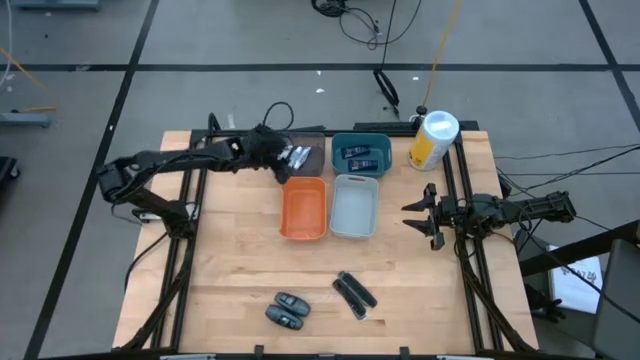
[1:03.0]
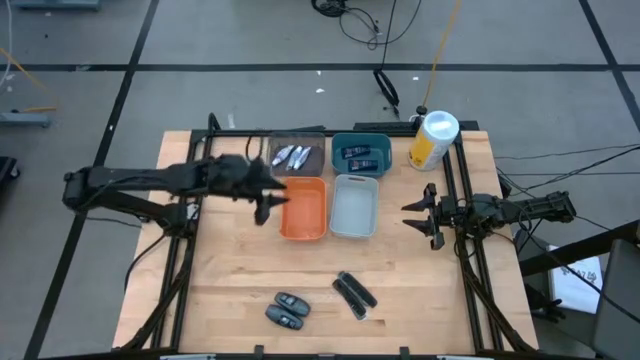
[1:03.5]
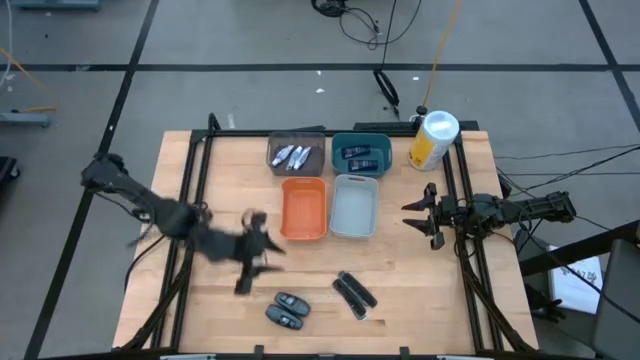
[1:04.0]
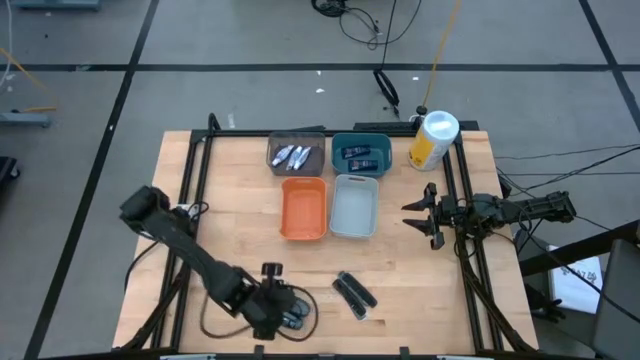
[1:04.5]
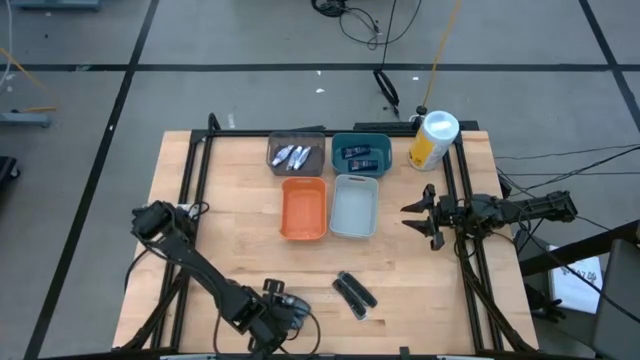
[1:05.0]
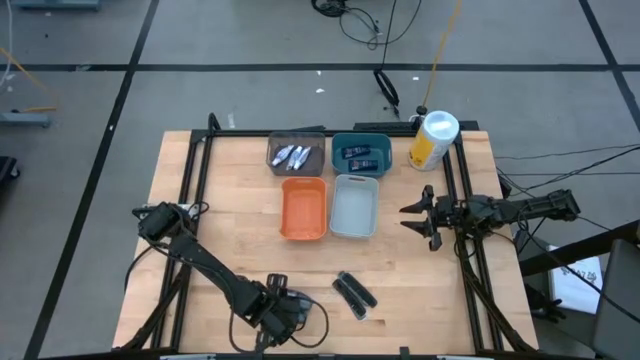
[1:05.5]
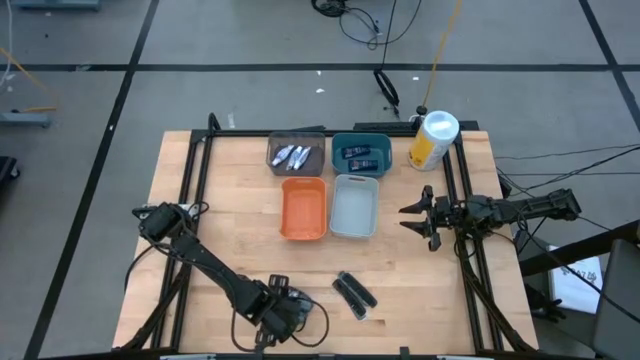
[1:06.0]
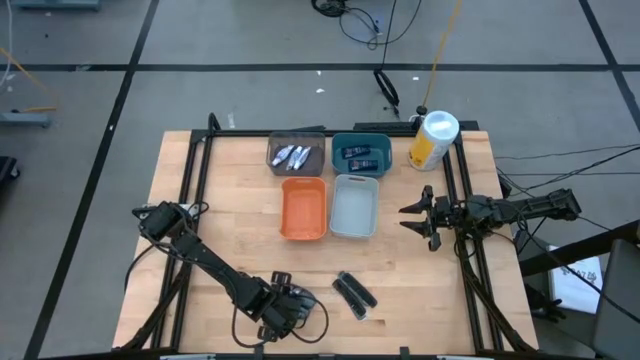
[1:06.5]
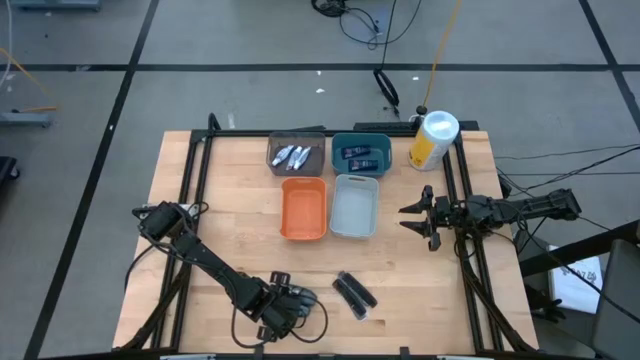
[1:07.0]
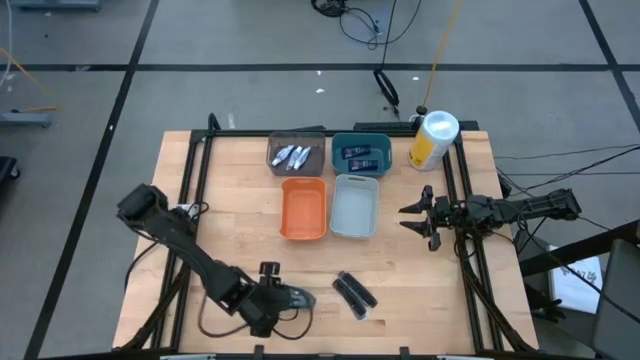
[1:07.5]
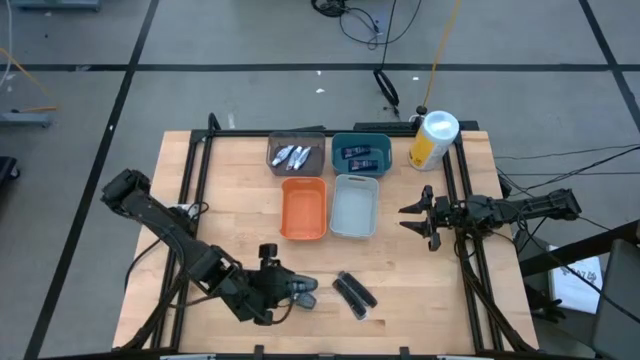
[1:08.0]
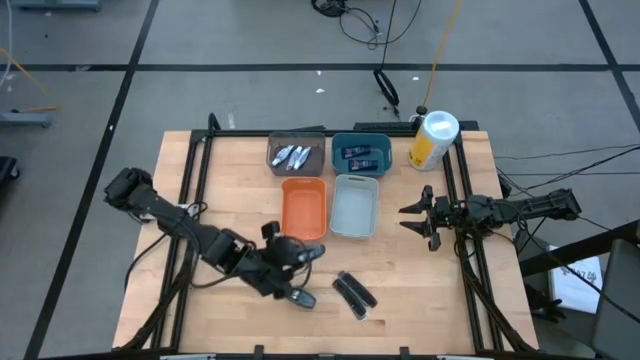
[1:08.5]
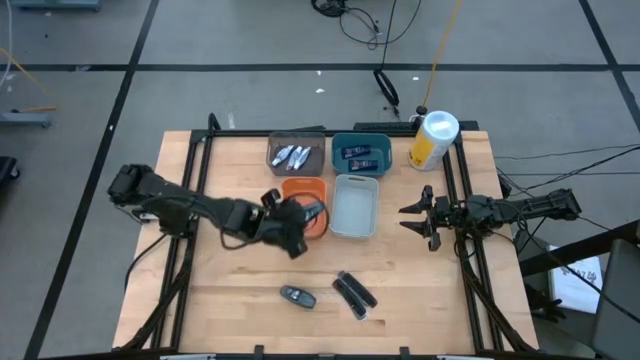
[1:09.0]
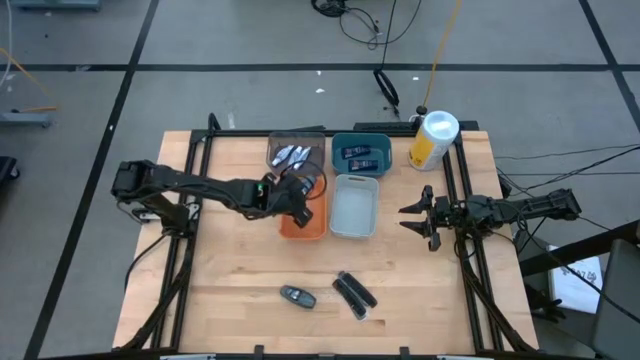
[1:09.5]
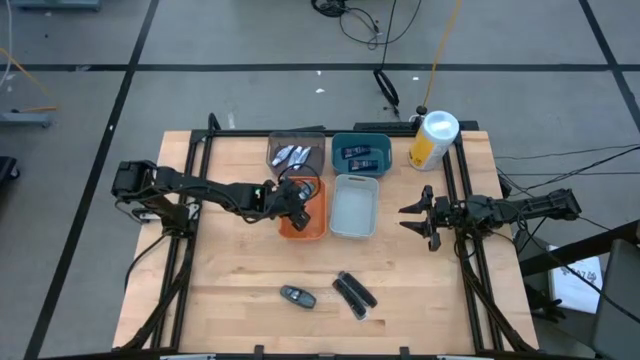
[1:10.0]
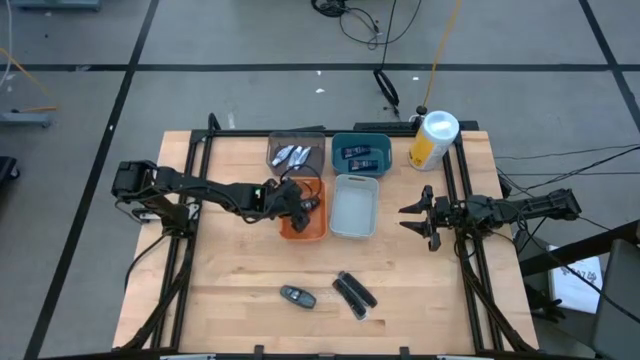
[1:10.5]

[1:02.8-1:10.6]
Task: Pick & Place Travel size toiletries
Put the bottom gray deodorant into the orange bin

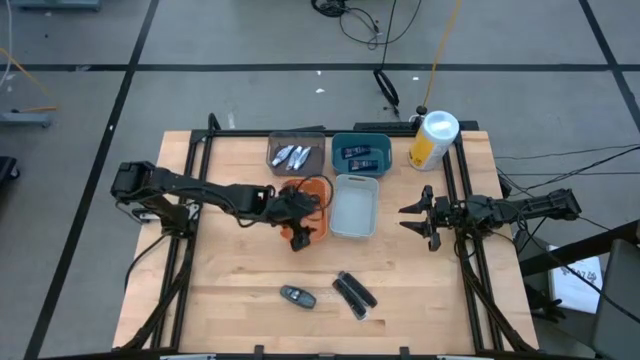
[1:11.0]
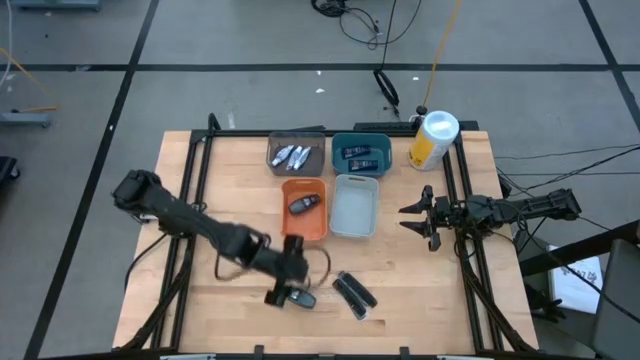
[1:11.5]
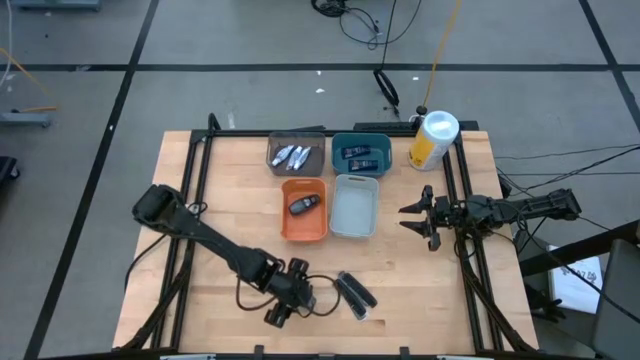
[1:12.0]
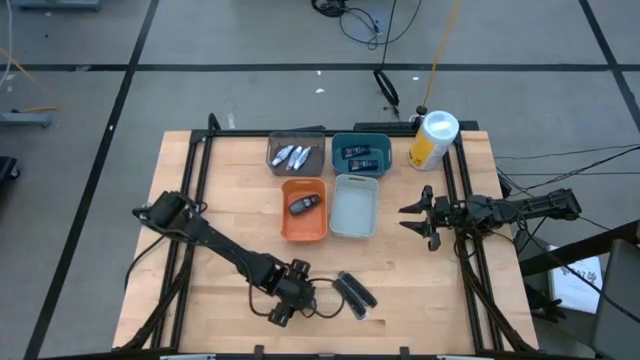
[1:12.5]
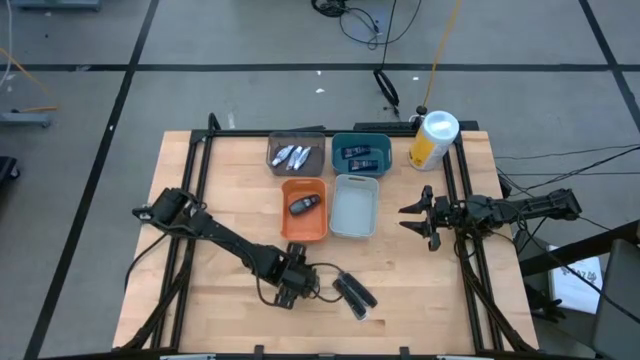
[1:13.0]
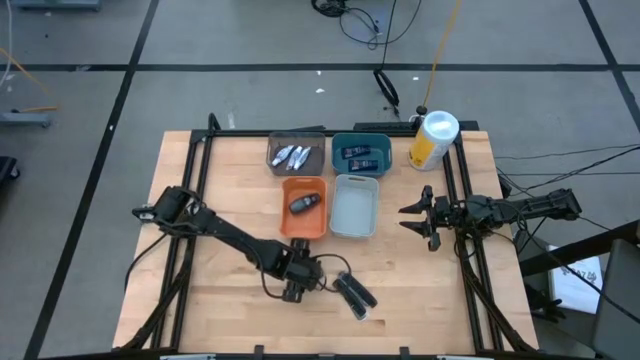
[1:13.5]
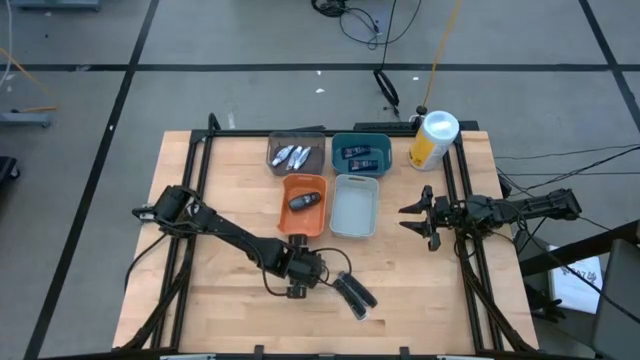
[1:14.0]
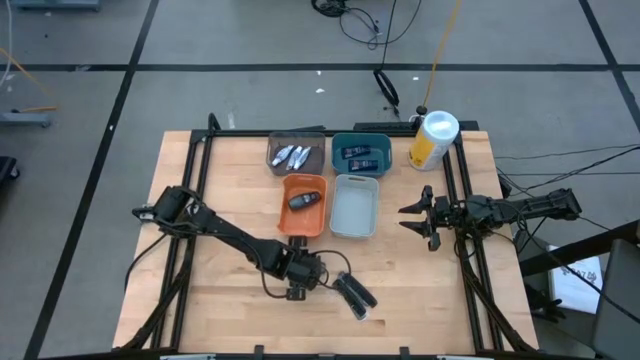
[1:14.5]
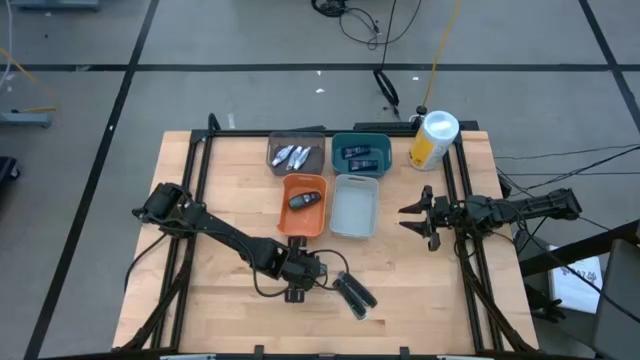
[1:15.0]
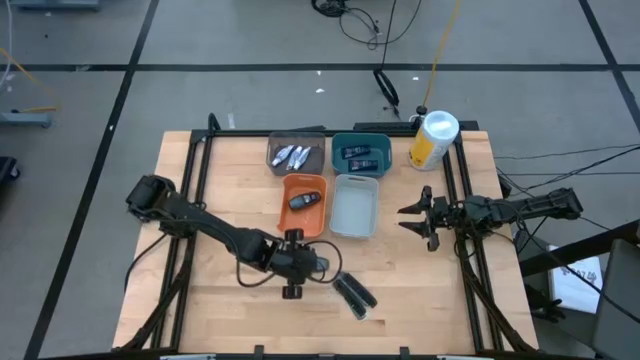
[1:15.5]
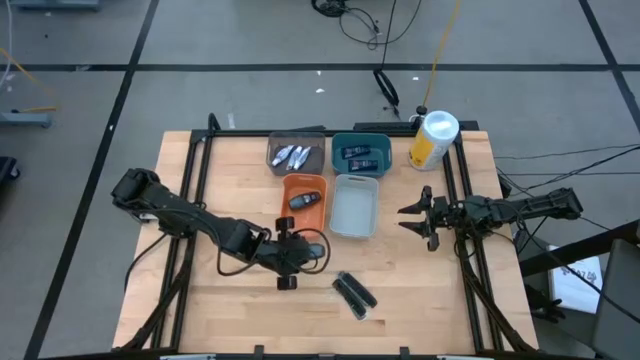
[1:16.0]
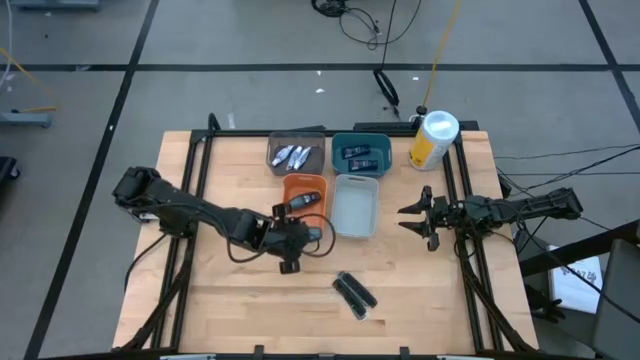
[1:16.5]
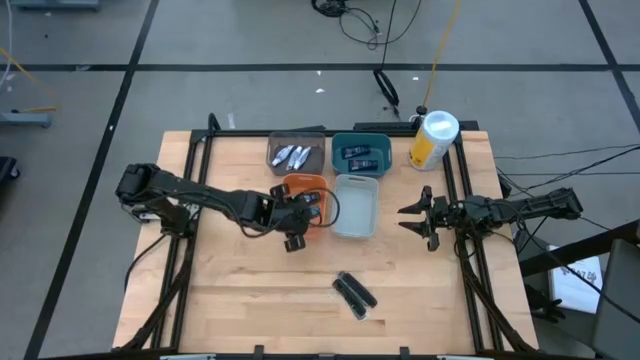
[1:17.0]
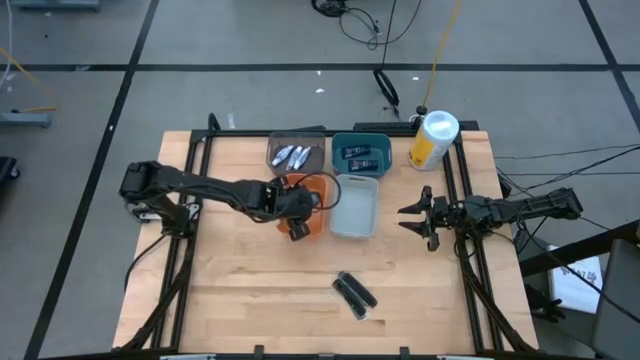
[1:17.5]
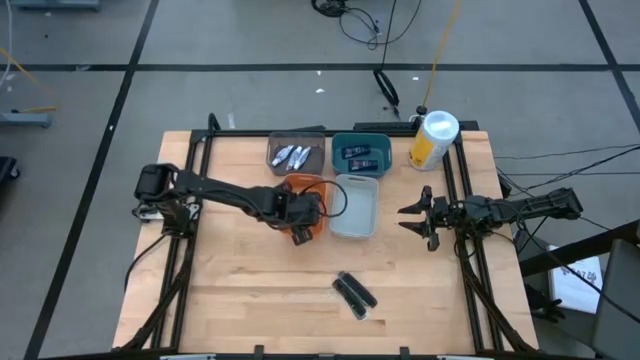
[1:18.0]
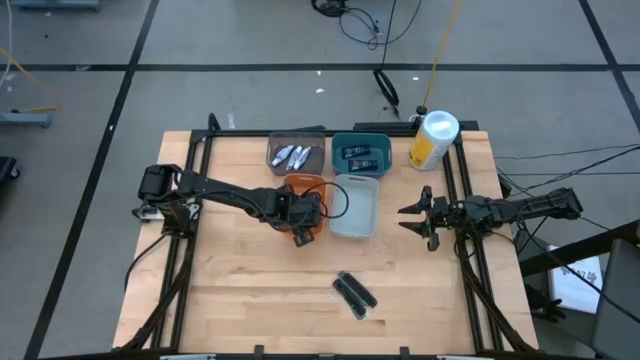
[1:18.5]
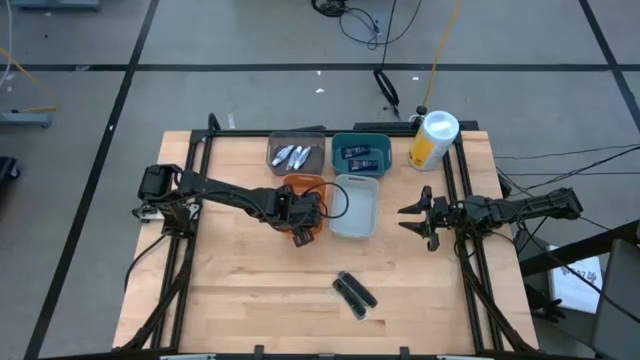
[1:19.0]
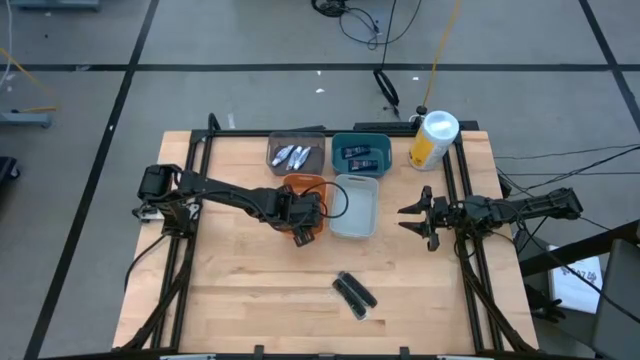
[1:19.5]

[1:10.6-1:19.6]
Put the gray deodorant into the orange bin

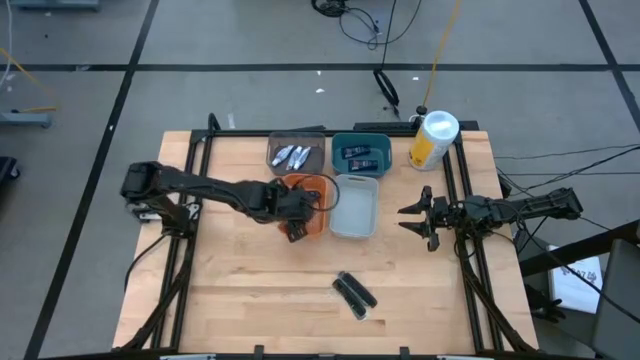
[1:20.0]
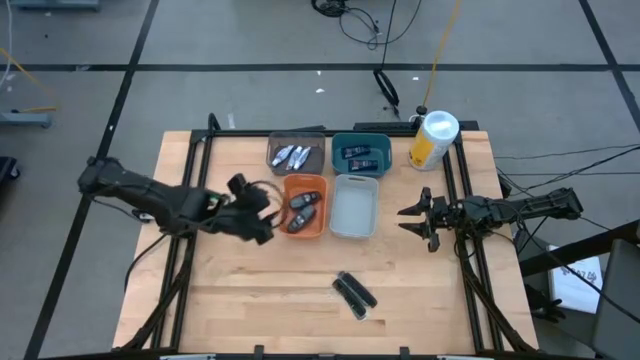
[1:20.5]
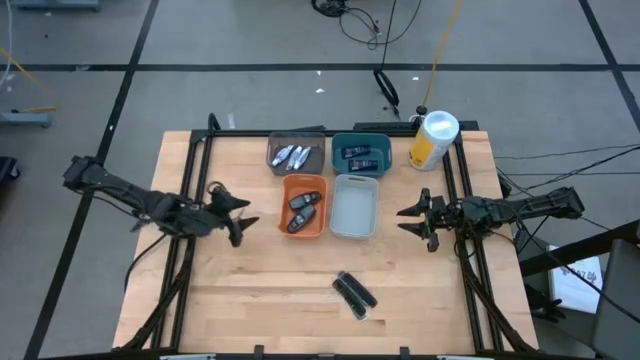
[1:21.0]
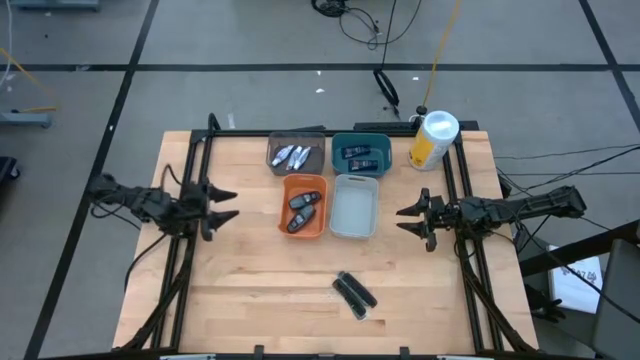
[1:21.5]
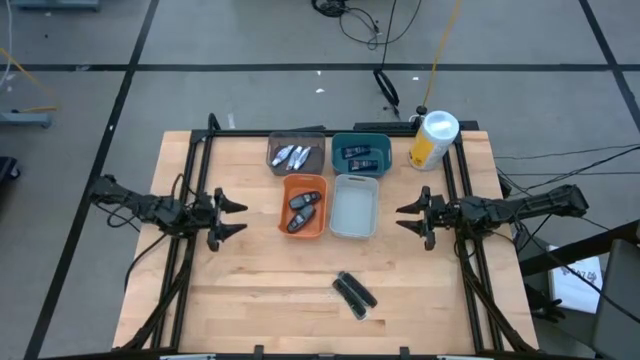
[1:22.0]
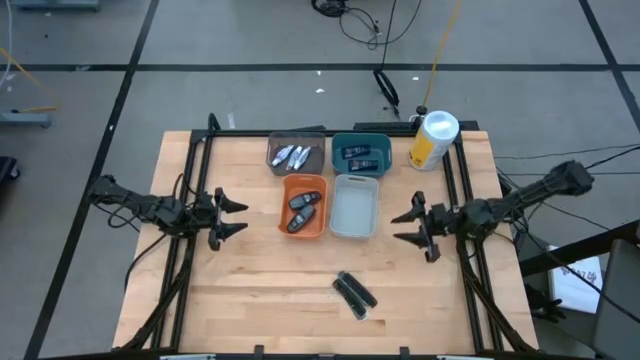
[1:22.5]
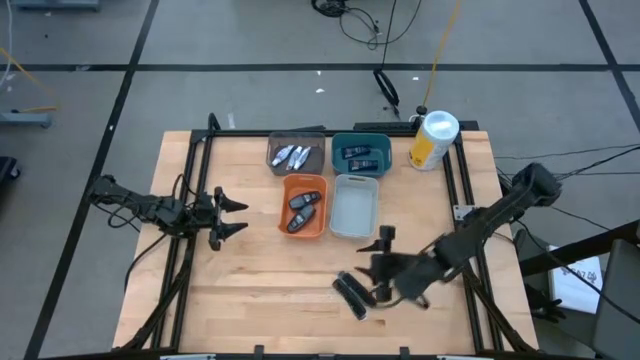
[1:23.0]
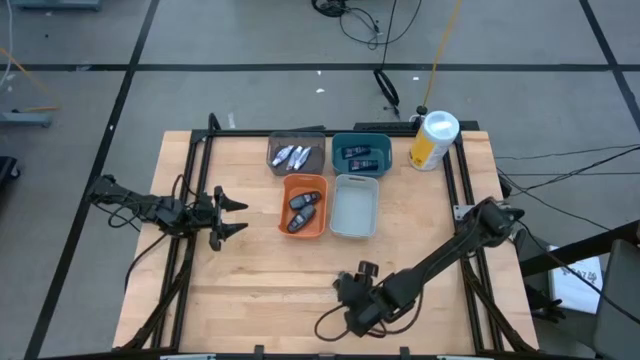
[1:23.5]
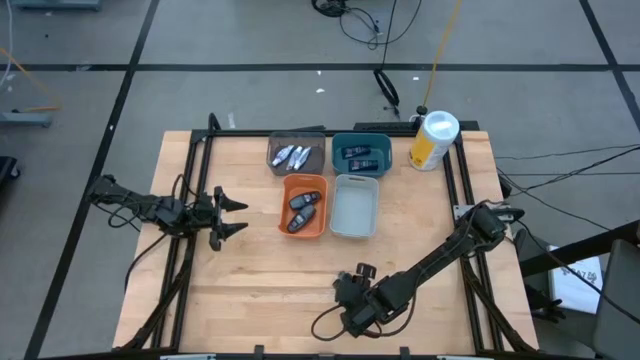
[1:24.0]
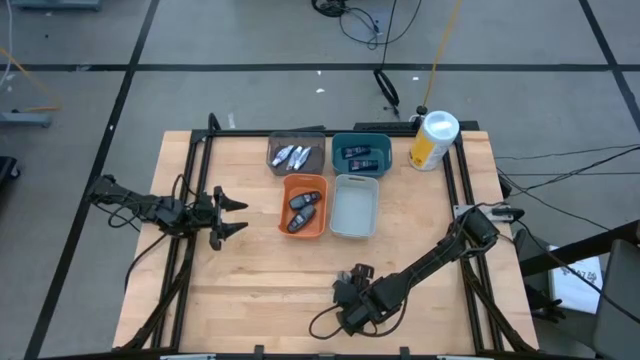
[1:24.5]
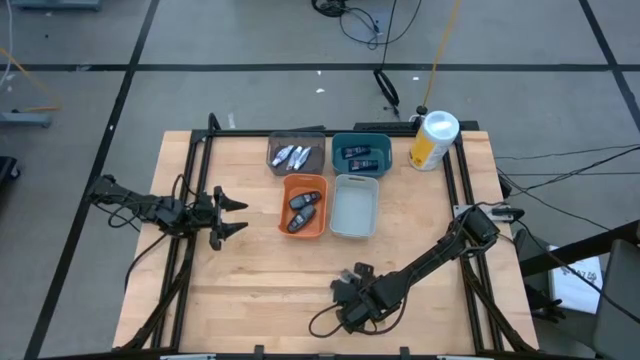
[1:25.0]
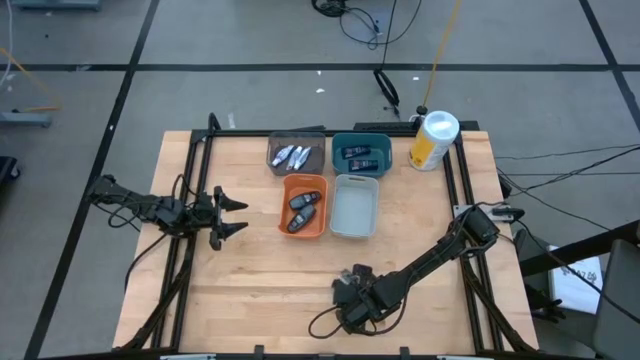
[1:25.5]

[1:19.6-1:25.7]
Put the black comb into the gray bin
